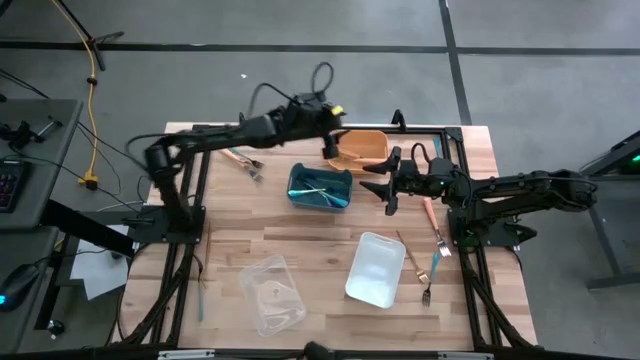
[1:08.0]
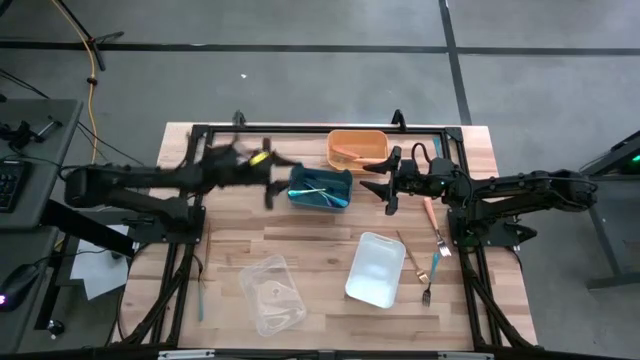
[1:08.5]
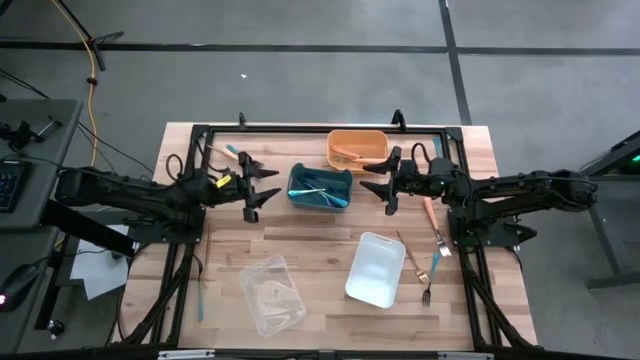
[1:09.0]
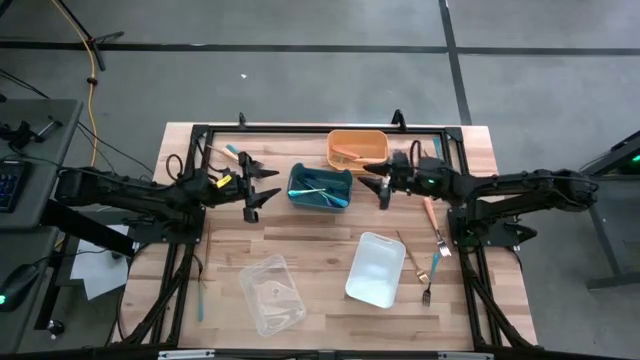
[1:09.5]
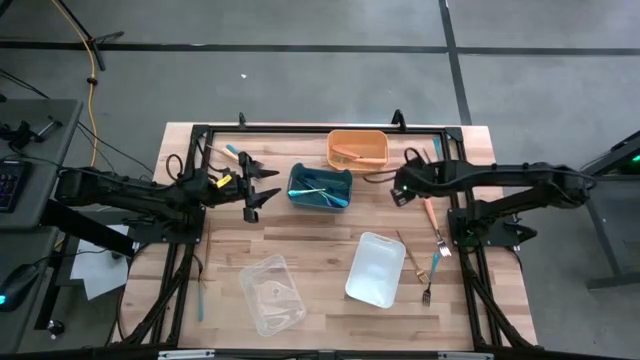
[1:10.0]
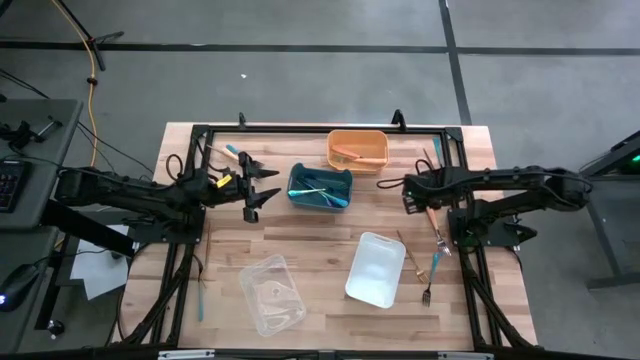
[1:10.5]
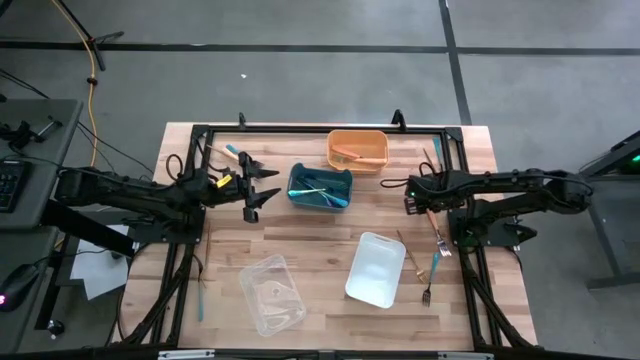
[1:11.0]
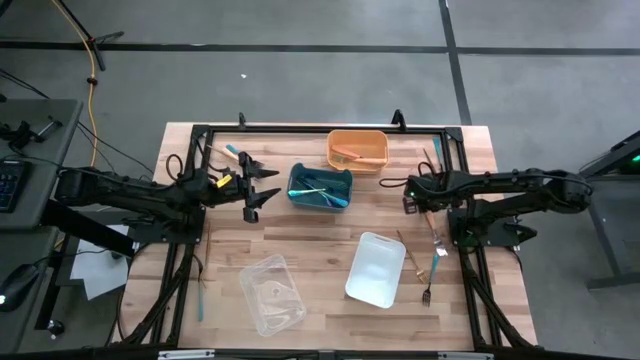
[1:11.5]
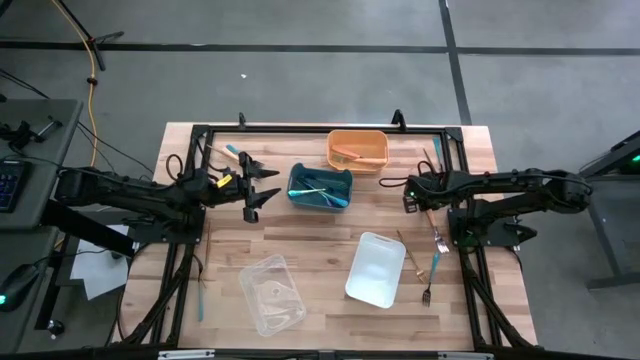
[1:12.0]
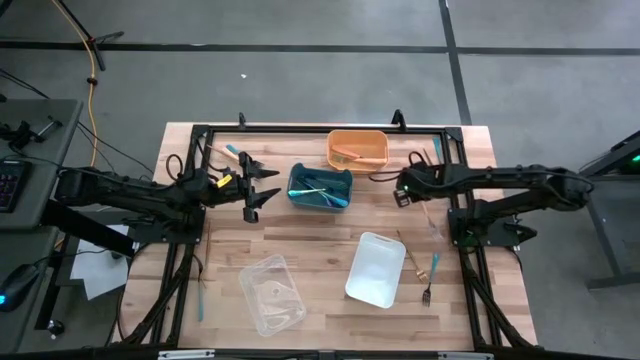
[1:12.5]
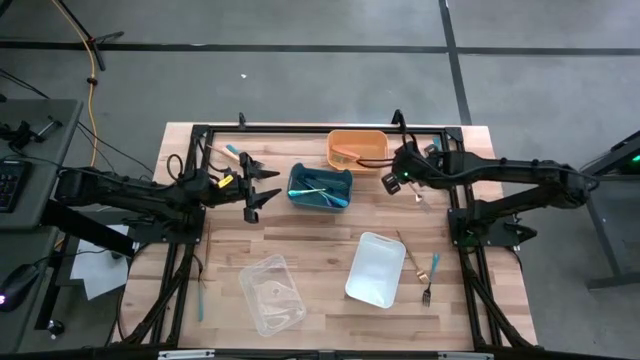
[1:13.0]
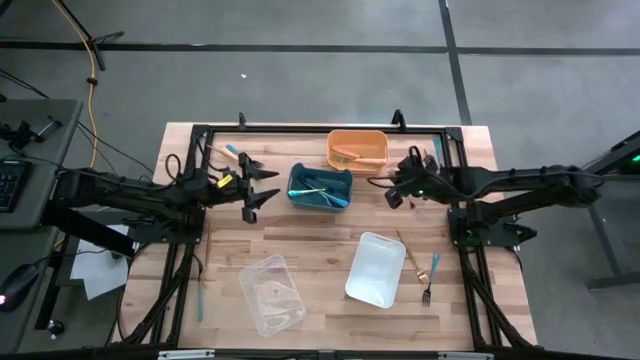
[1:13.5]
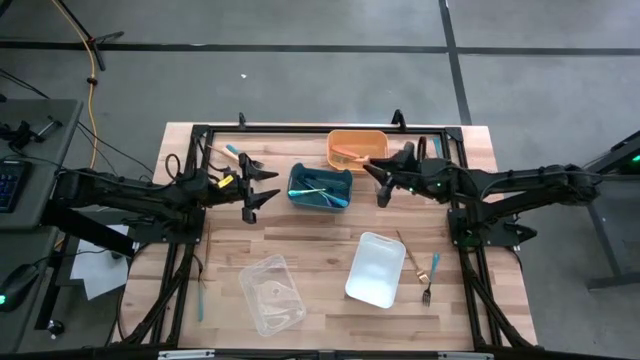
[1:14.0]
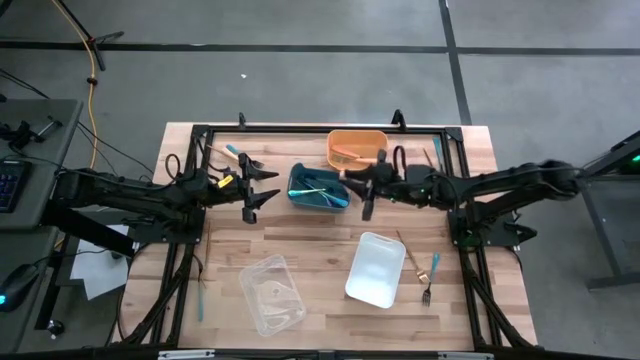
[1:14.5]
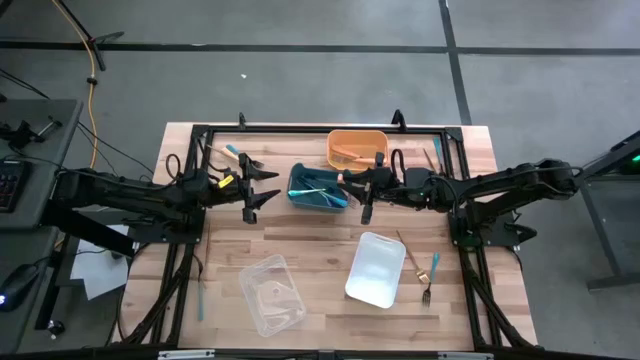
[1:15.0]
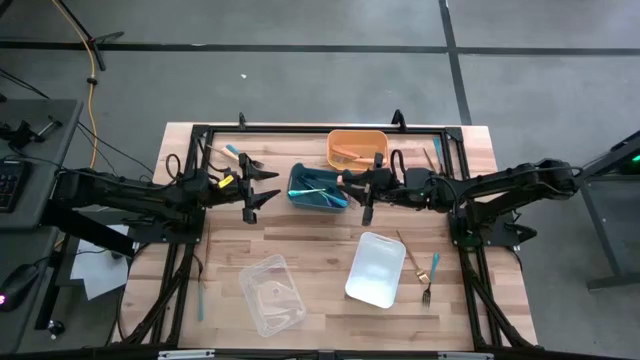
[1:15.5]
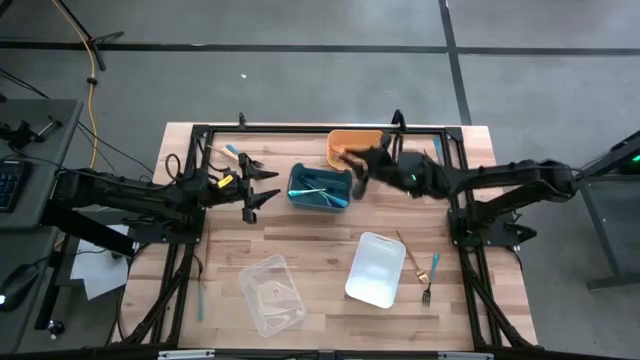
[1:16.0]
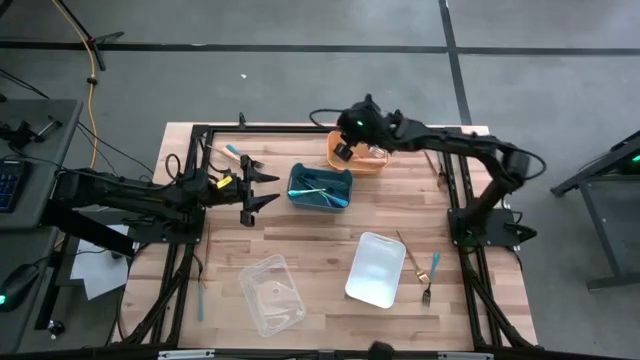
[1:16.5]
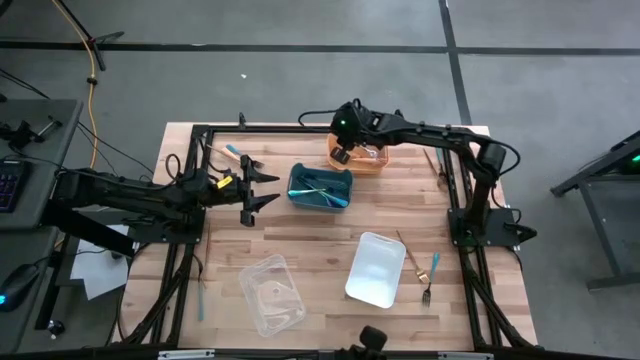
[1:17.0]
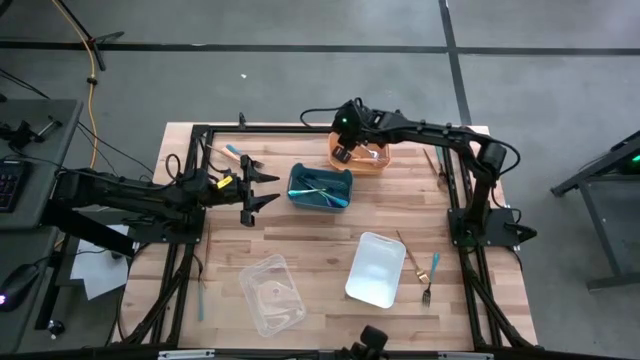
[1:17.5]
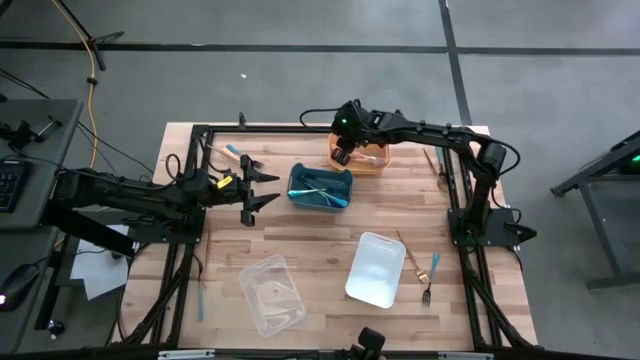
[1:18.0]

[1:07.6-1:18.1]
Task: Sort silverware by color (type)
Put the light orange fork into the yellow bin

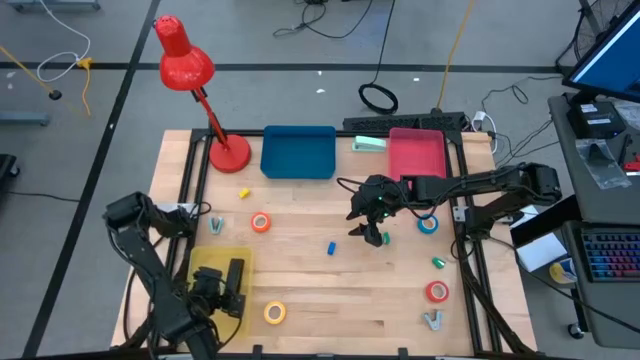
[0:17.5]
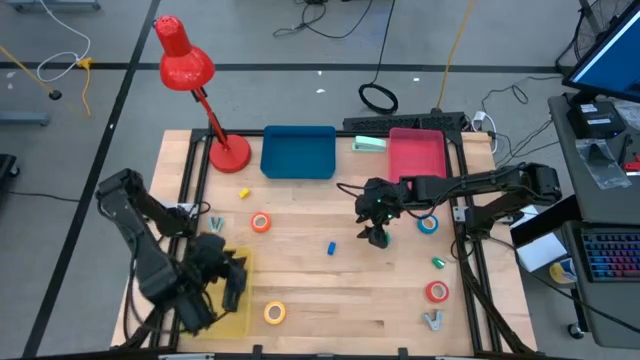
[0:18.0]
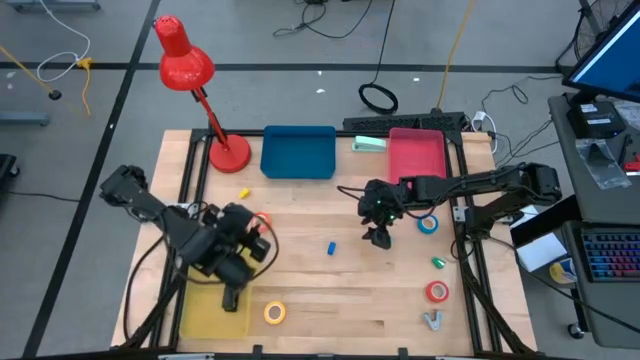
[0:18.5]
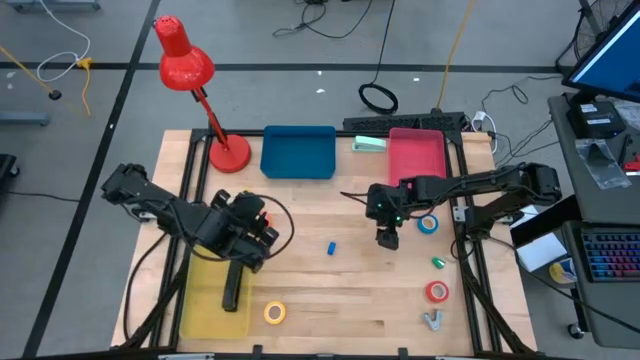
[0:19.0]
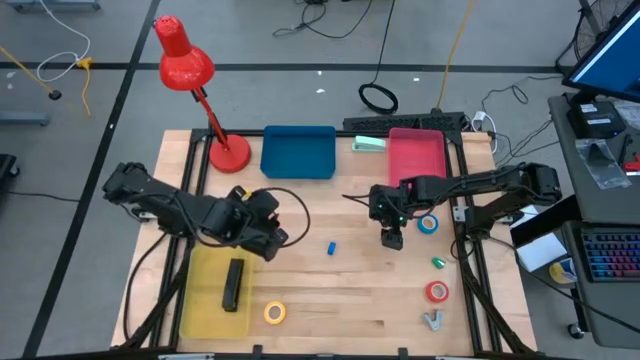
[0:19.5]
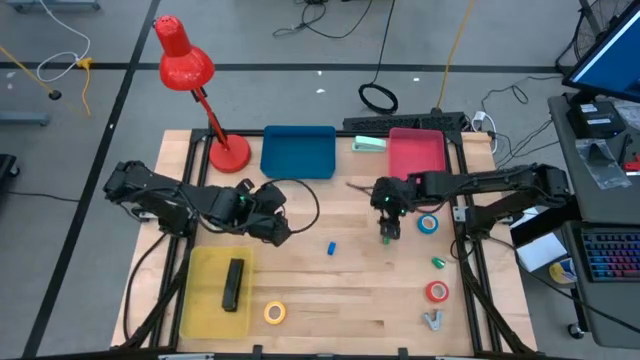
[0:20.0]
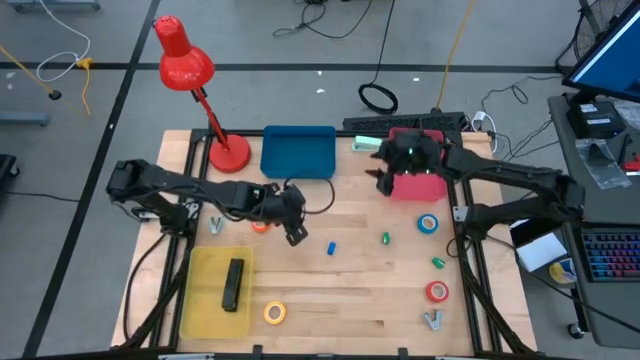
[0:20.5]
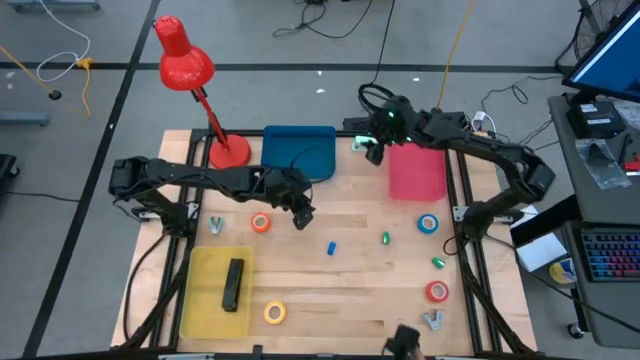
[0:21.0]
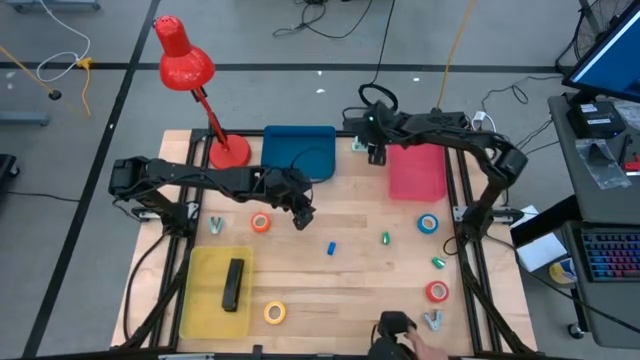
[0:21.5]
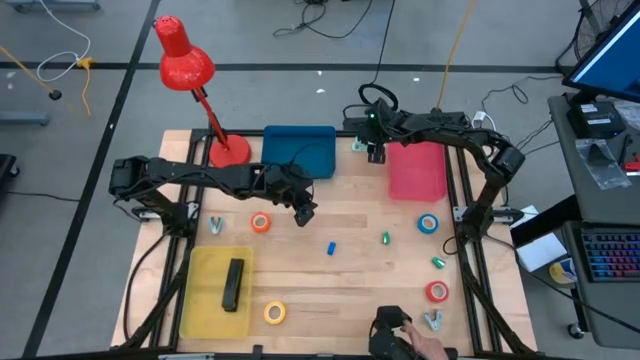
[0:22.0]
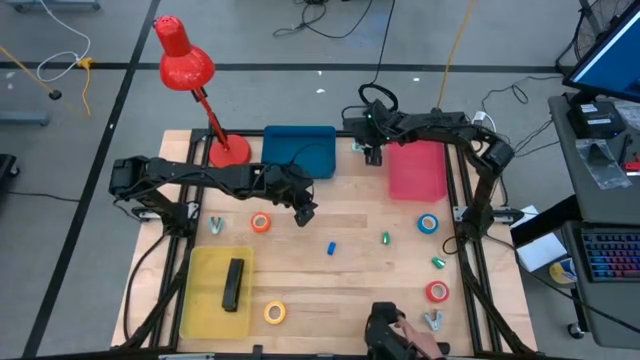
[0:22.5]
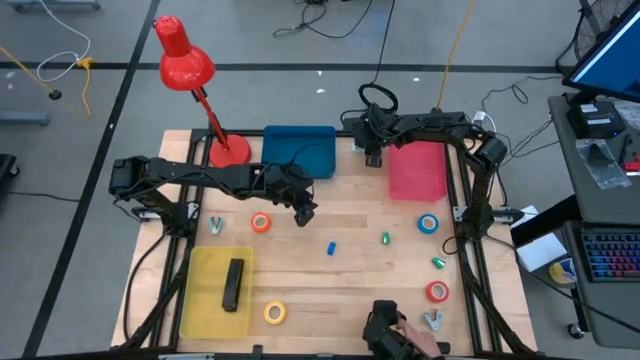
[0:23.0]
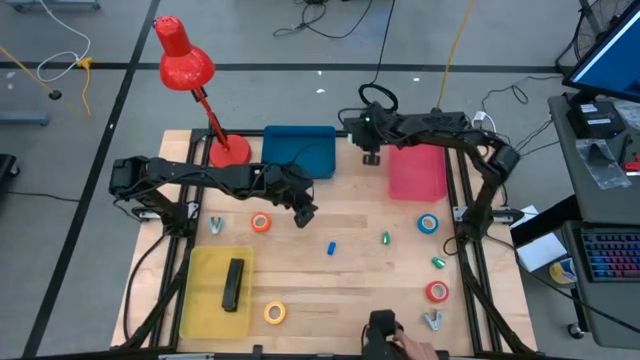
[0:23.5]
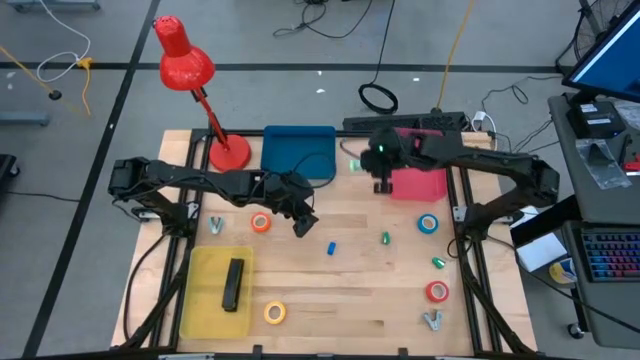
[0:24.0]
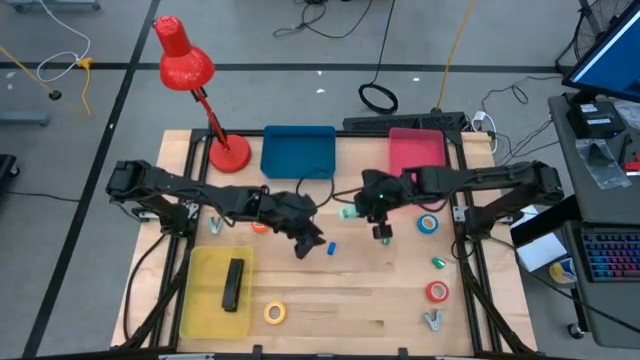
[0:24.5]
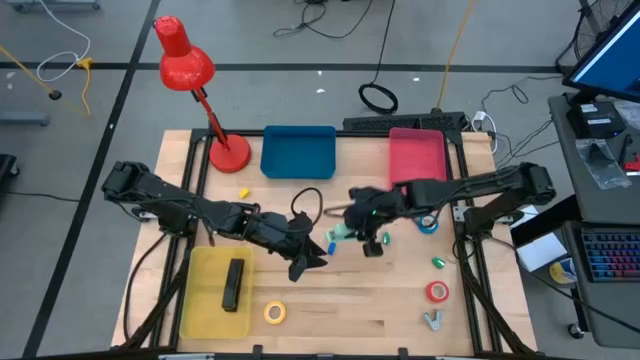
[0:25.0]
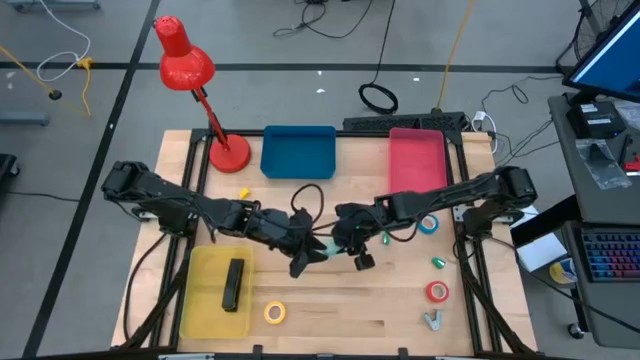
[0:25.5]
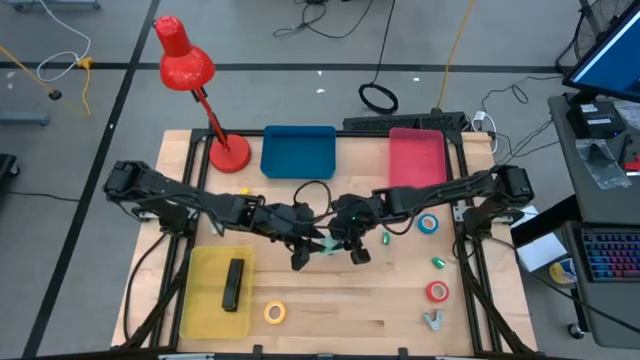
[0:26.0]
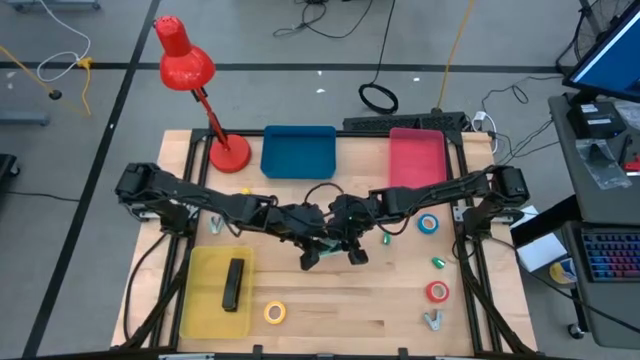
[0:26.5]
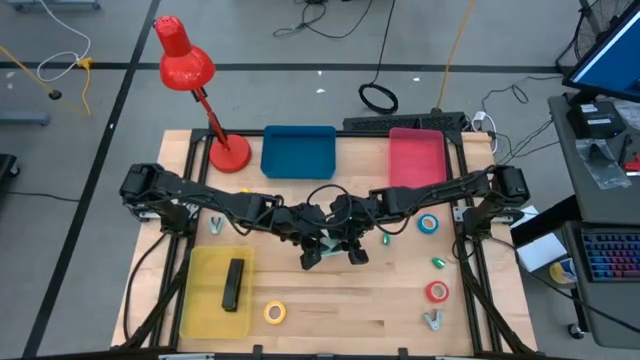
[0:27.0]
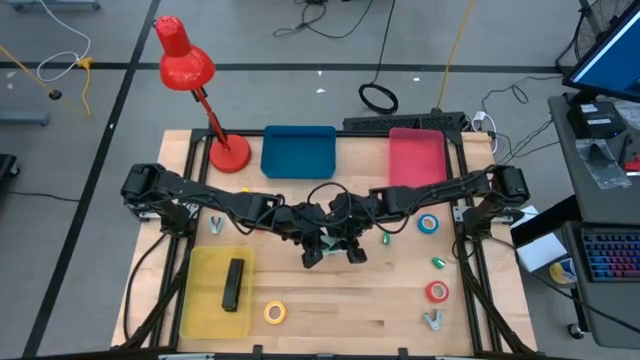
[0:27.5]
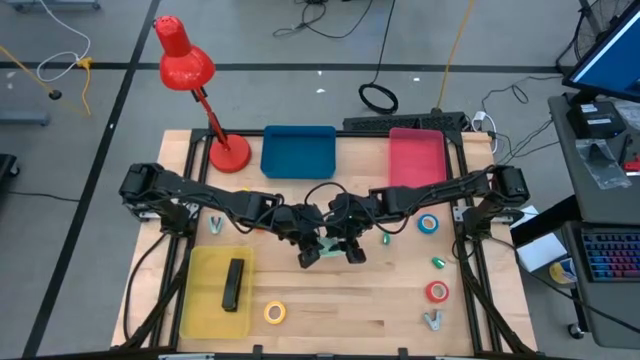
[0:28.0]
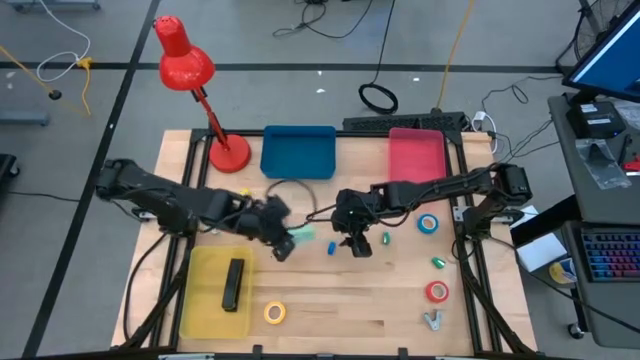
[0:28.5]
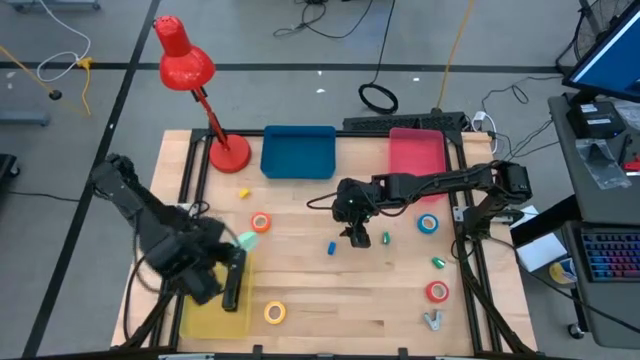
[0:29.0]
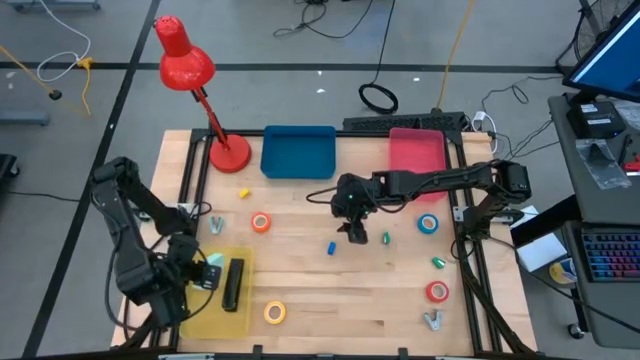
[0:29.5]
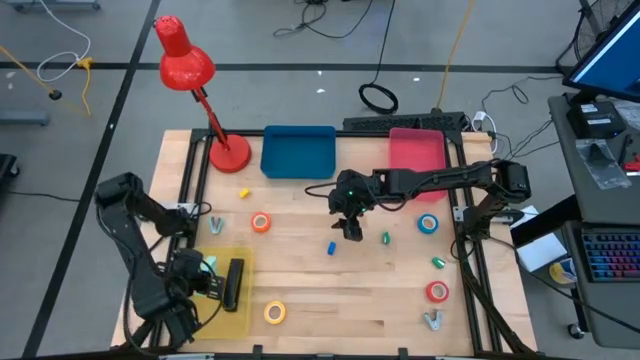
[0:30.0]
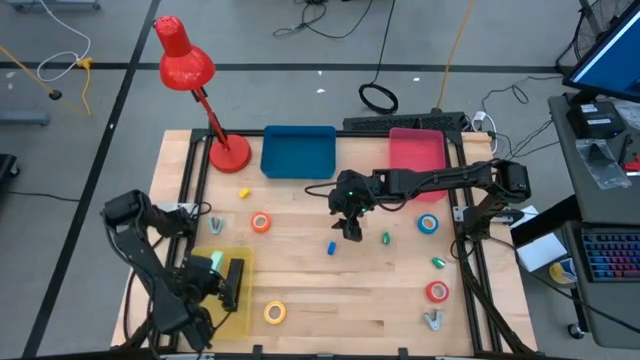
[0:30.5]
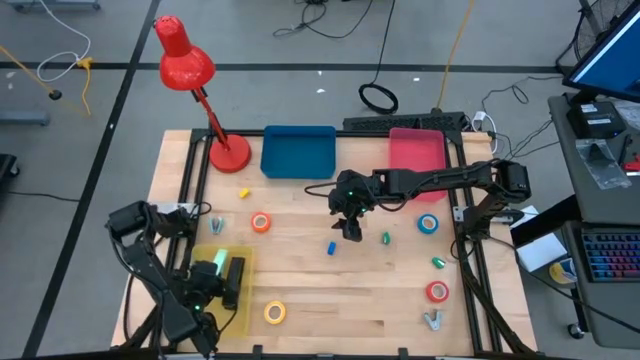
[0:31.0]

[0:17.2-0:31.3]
Task: Pick and place Stapler, Stapler remover, tape
Put the light blue stapler into the yellow bin
